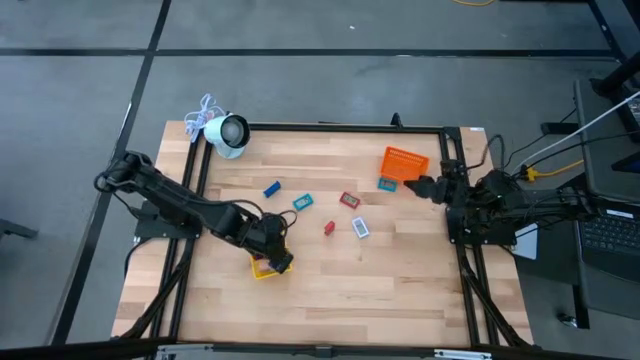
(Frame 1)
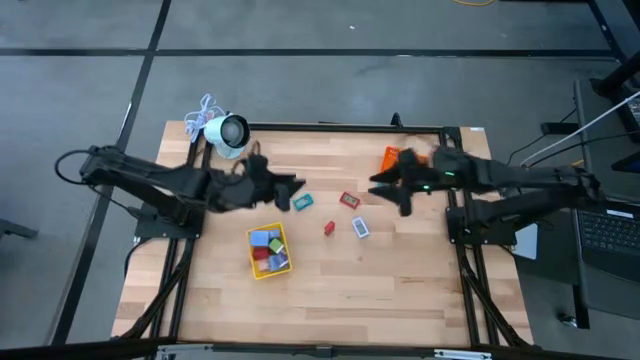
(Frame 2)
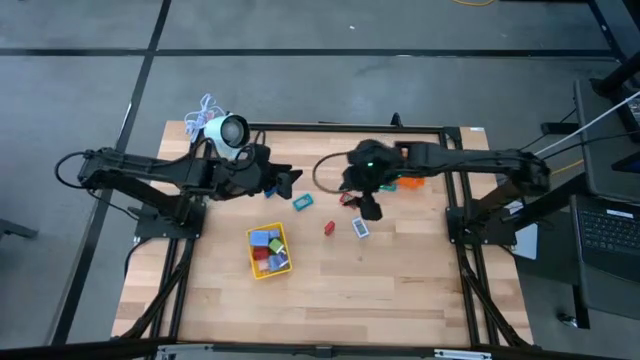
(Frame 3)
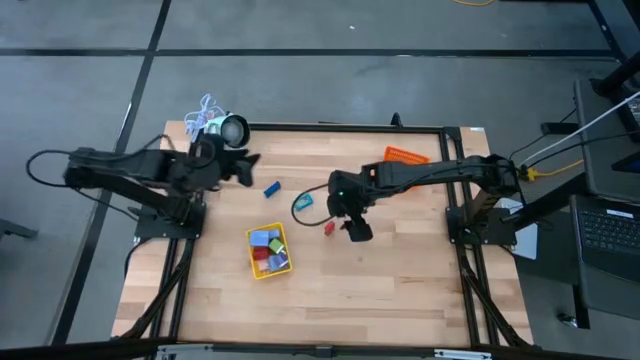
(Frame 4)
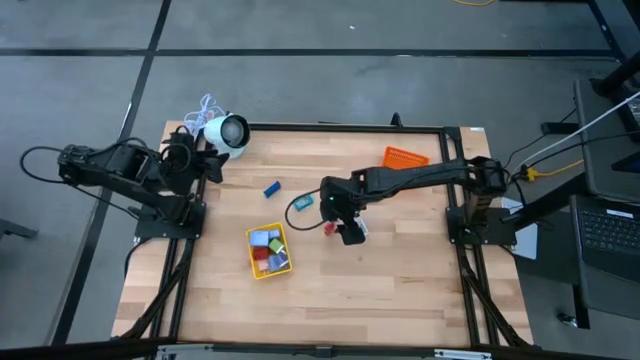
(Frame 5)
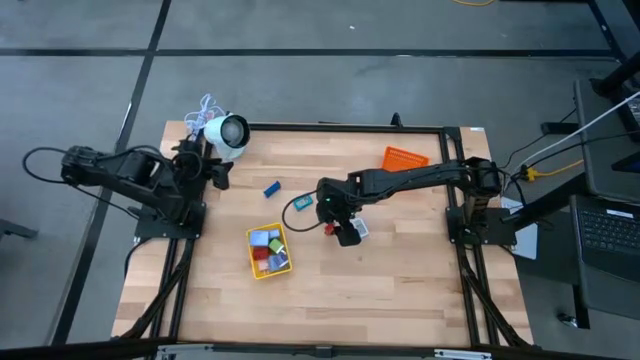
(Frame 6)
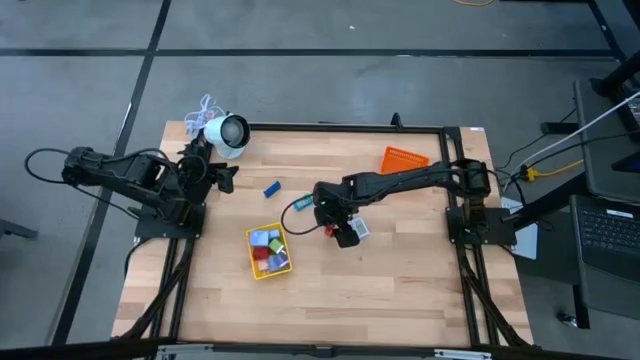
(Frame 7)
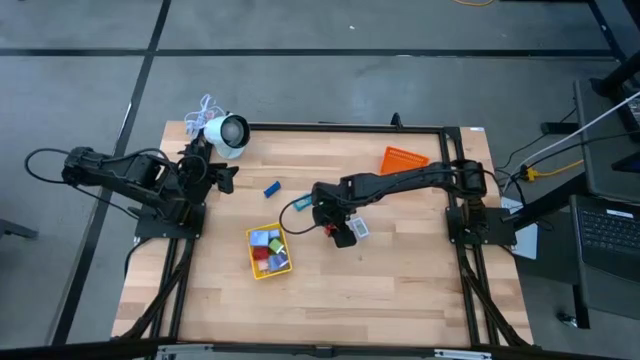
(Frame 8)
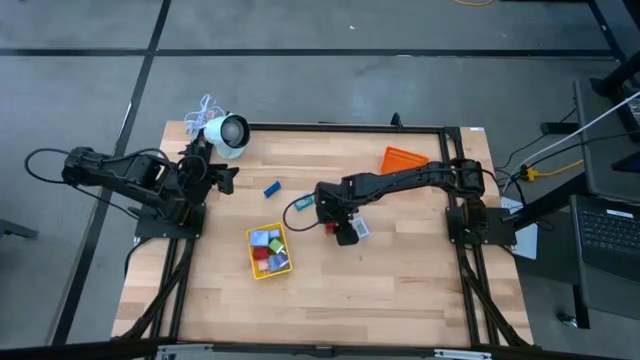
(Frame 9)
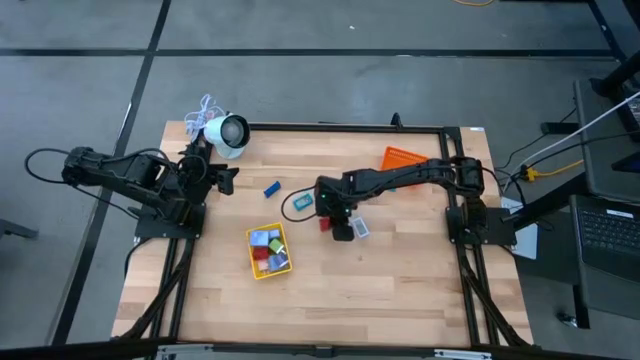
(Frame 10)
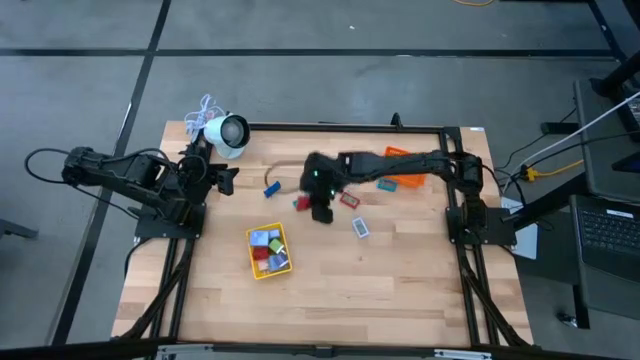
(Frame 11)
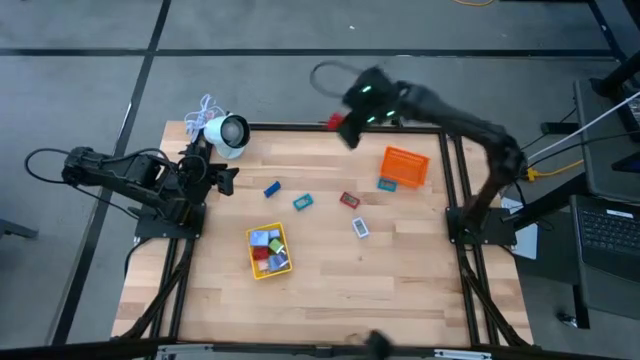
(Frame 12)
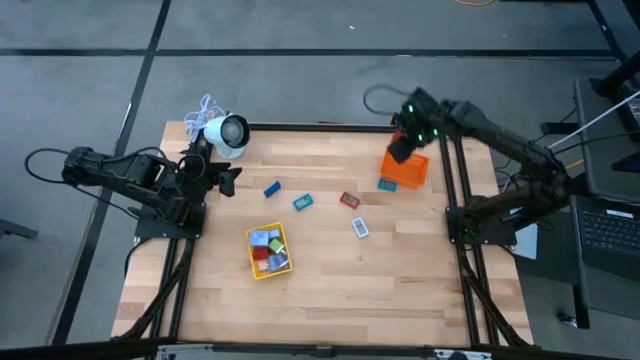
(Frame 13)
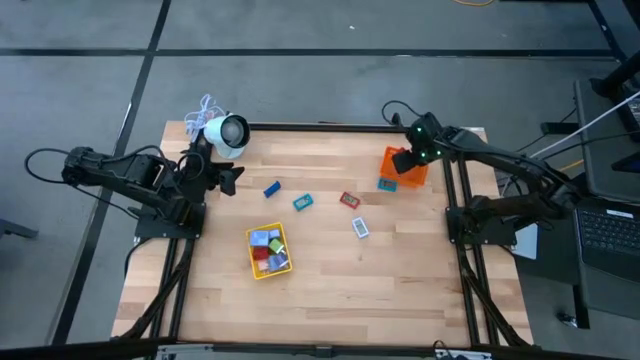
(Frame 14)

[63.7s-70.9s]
Task: Pick & Place Office items
Put the bottom red digital timer into the orange bin

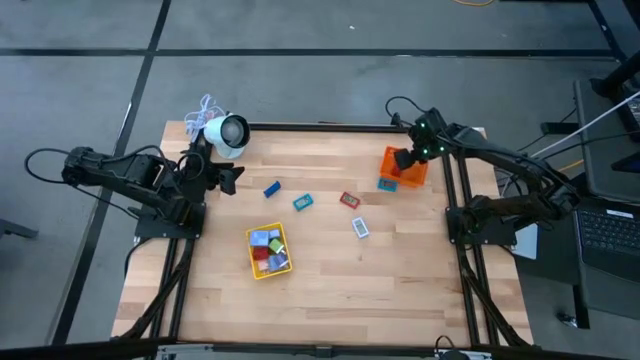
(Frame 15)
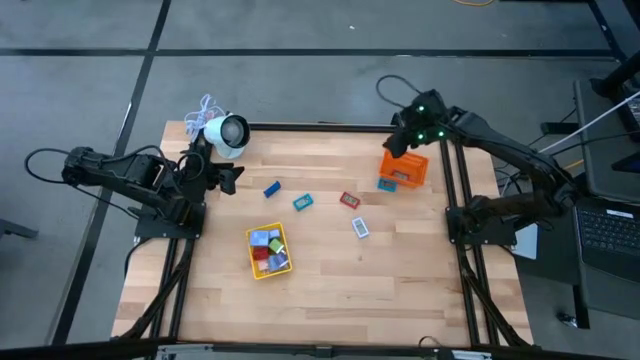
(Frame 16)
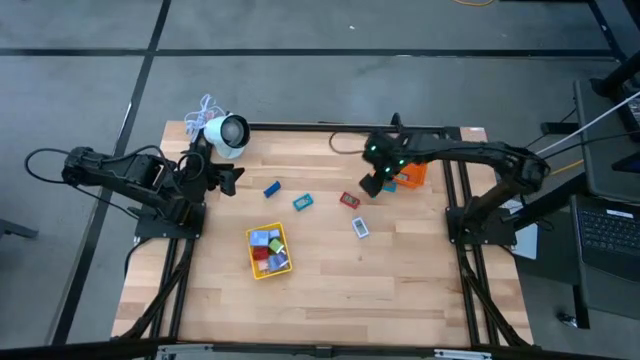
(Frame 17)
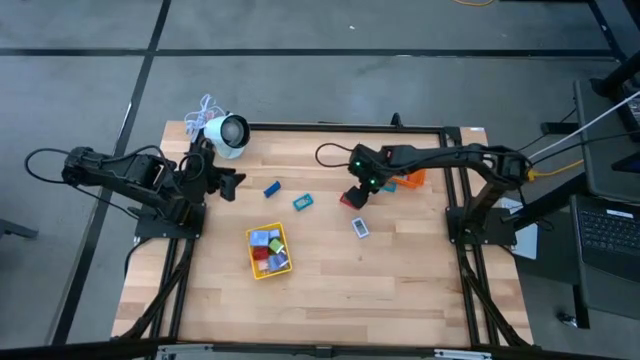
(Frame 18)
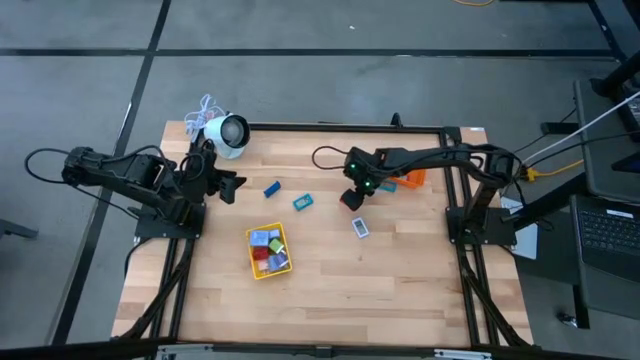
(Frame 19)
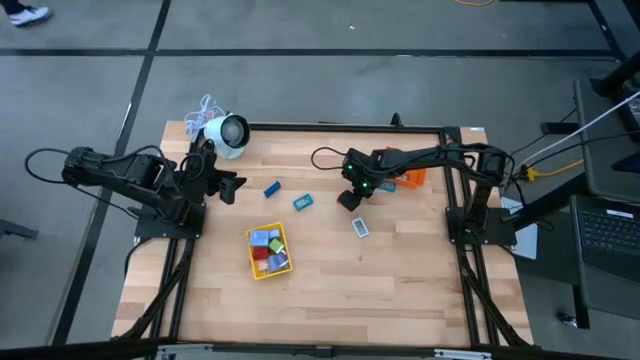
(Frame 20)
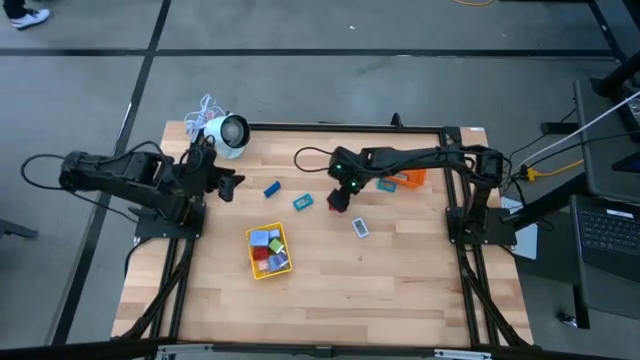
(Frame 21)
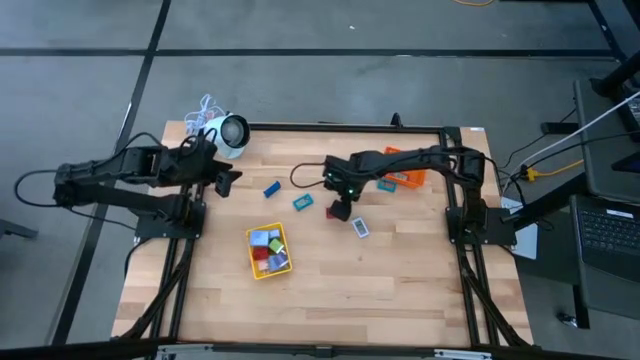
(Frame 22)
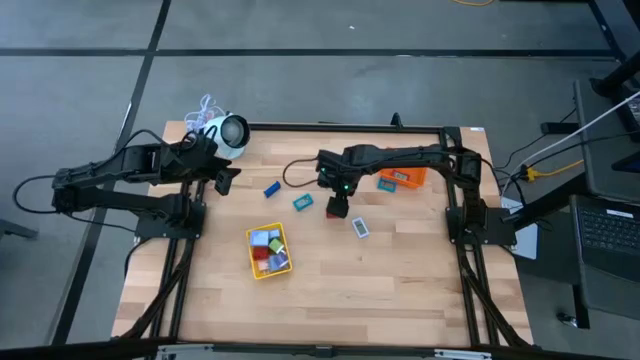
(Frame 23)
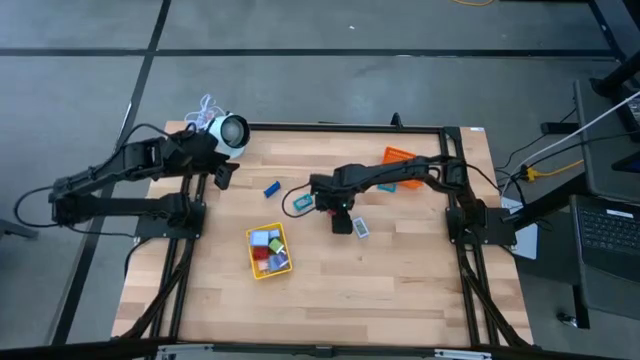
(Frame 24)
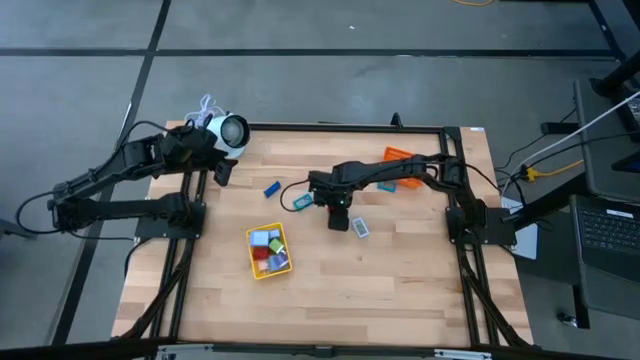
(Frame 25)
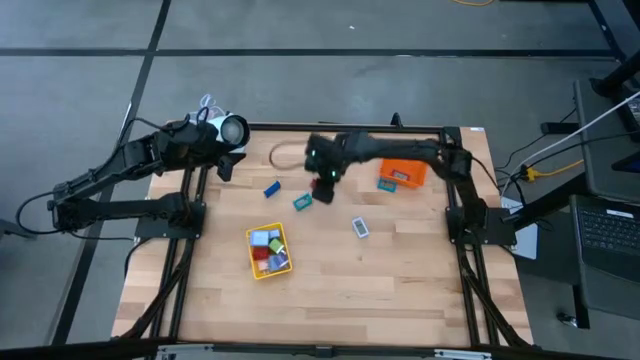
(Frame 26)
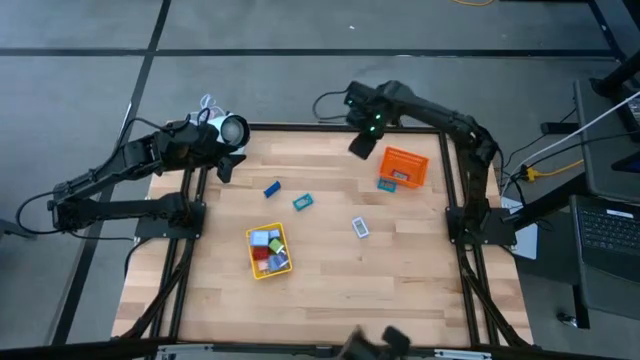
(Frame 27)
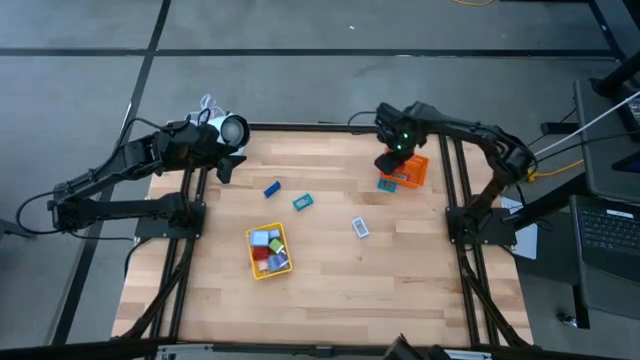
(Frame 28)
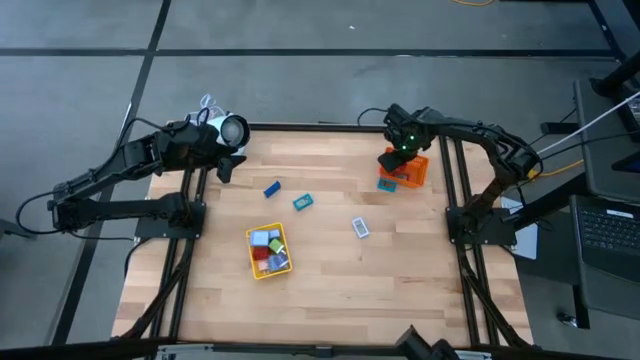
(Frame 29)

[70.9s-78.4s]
Put the red digital timer into the orange bin

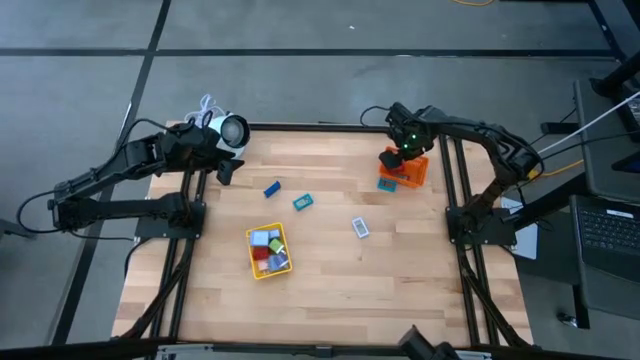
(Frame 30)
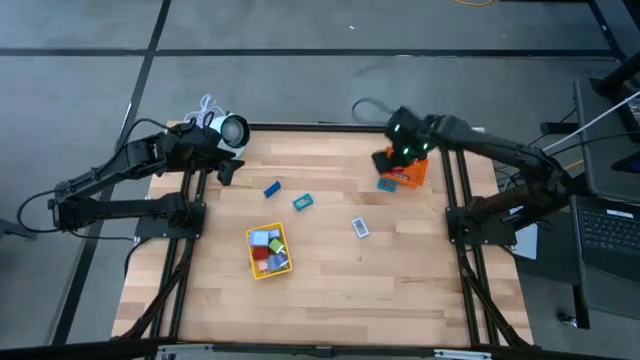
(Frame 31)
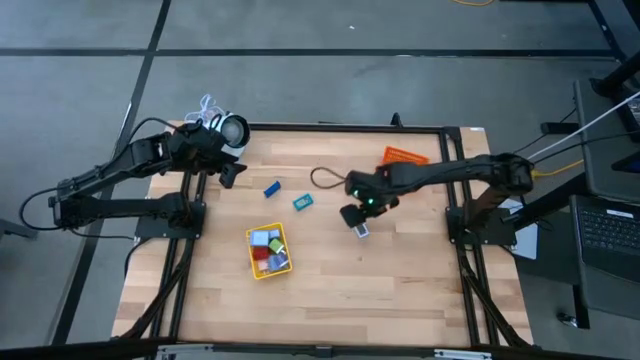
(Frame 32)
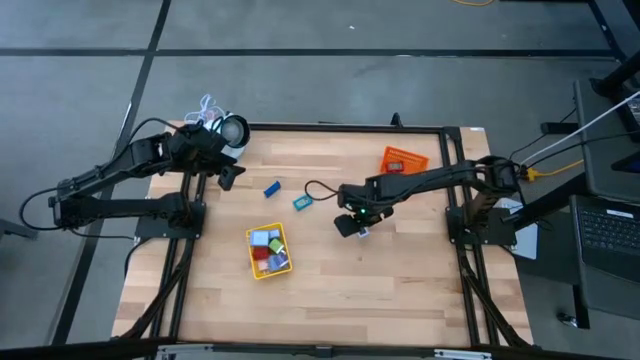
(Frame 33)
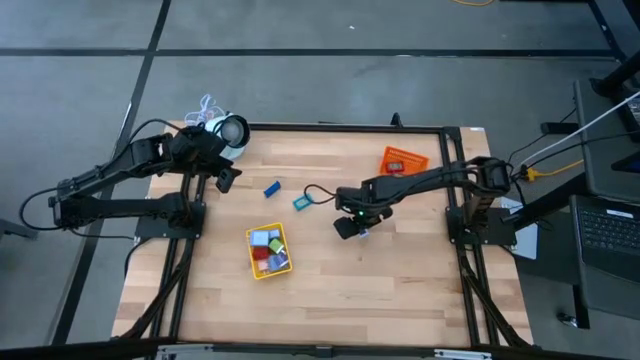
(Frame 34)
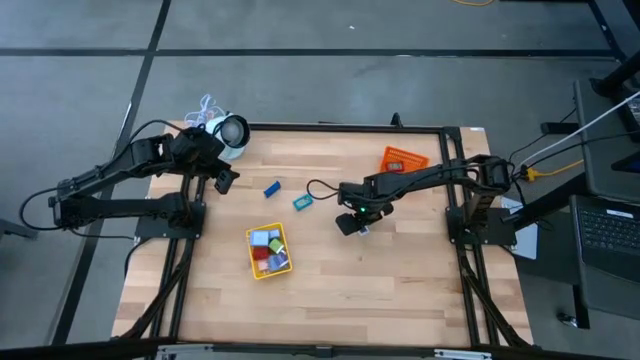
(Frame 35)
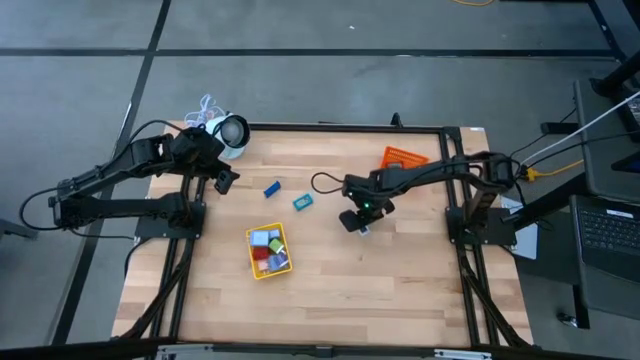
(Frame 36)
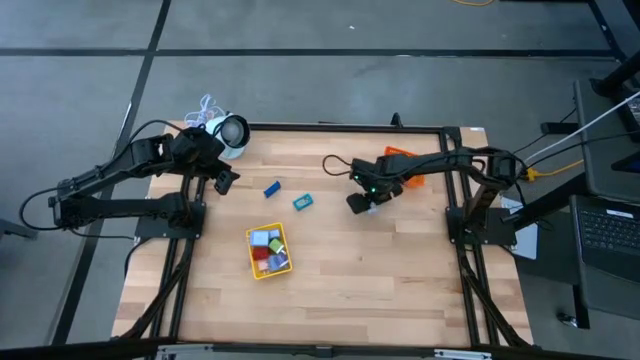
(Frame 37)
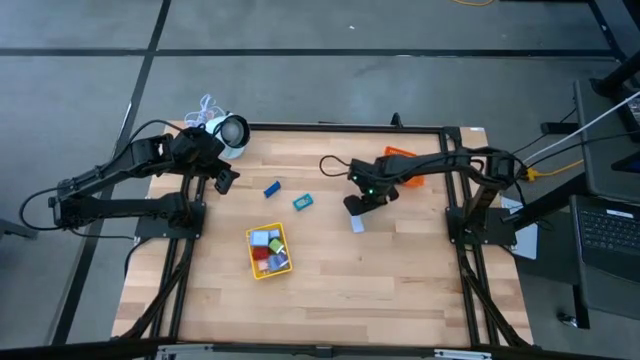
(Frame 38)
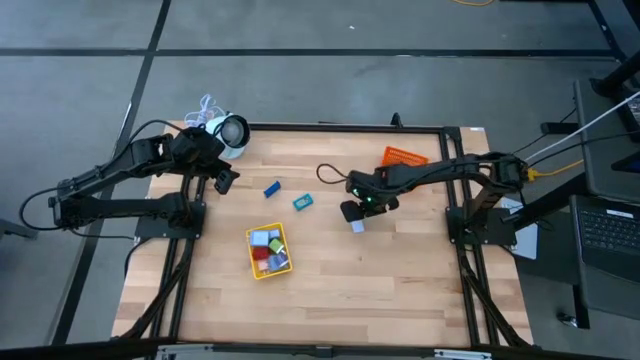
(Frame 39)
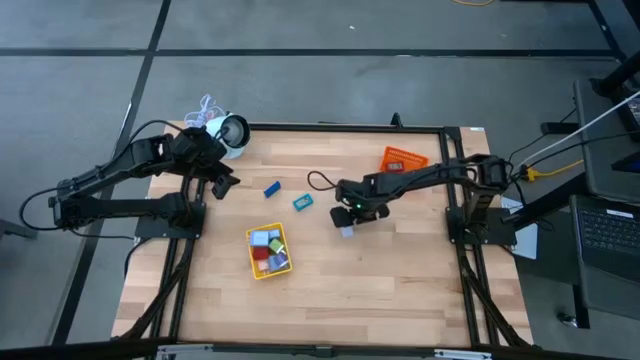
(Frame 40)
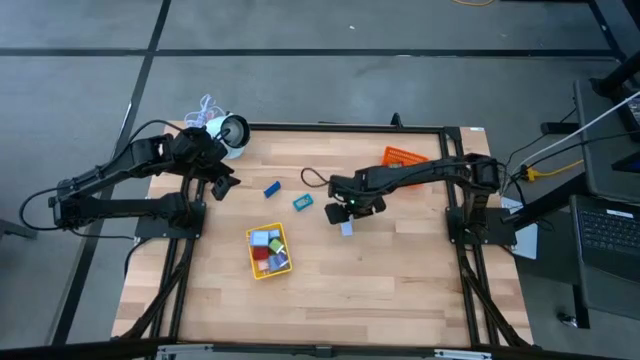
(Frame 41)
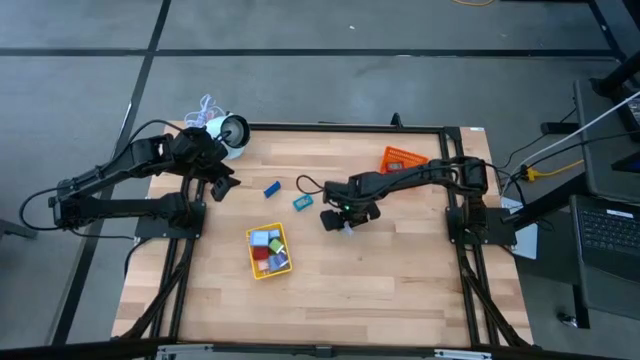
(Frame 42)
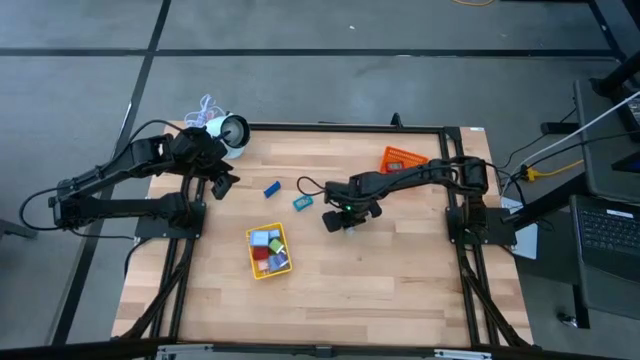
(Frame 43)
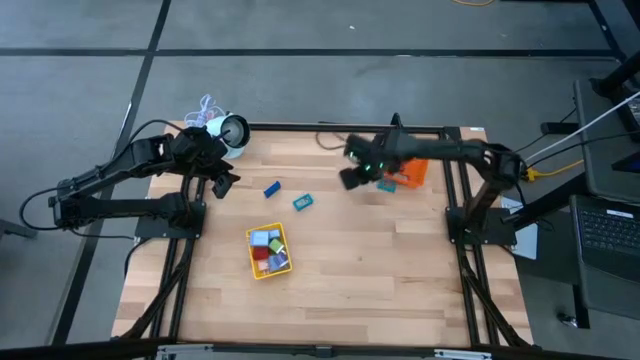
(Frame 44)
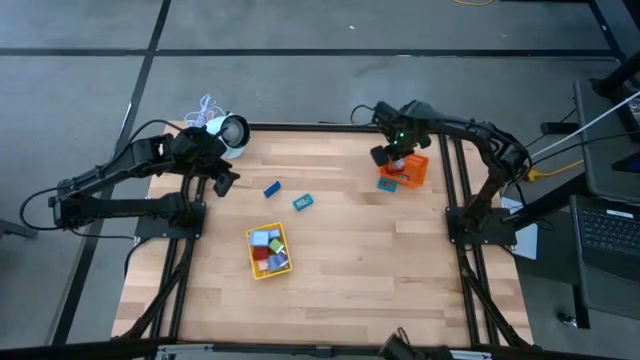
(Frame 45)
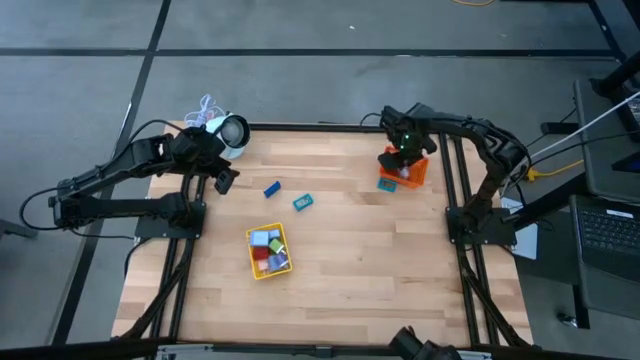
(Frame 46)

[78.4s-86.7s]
Put the white digital timer into the orange bin
